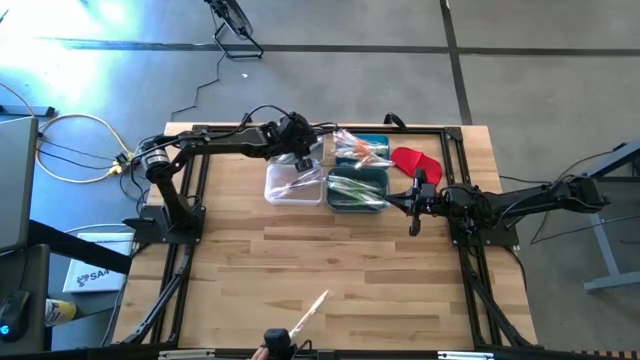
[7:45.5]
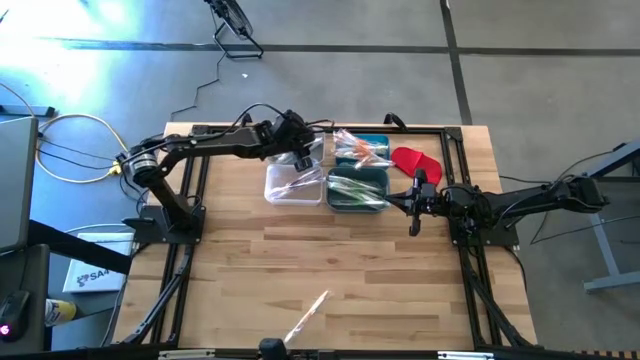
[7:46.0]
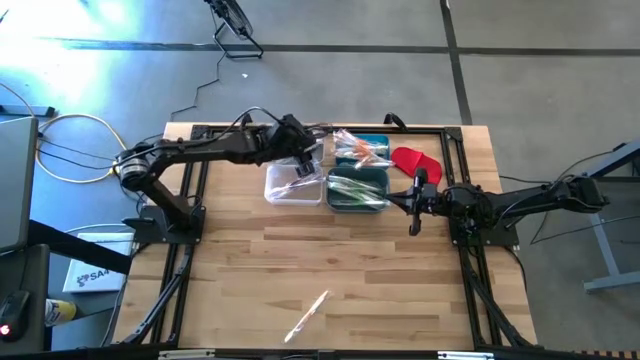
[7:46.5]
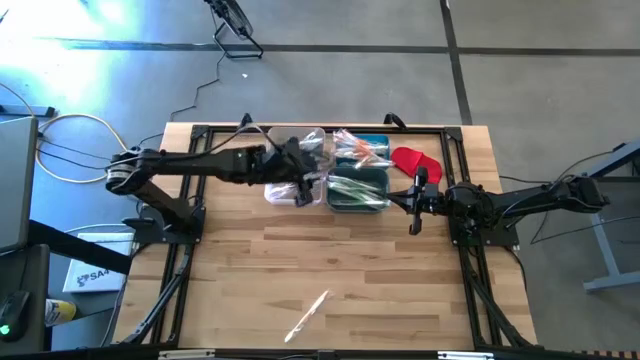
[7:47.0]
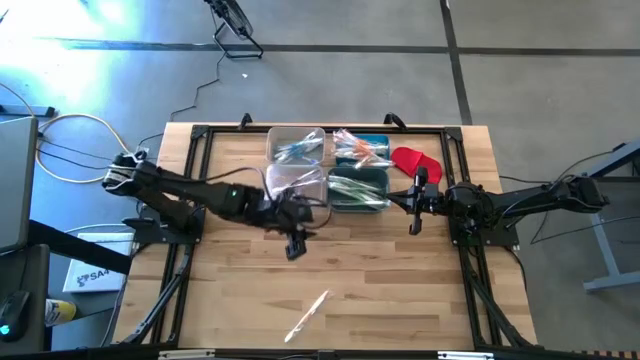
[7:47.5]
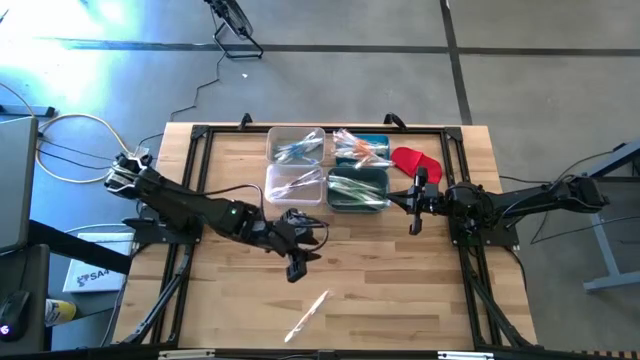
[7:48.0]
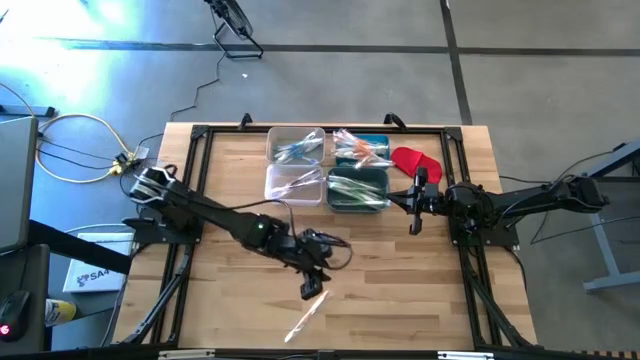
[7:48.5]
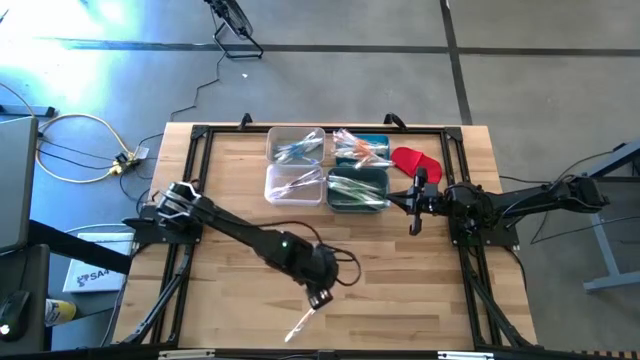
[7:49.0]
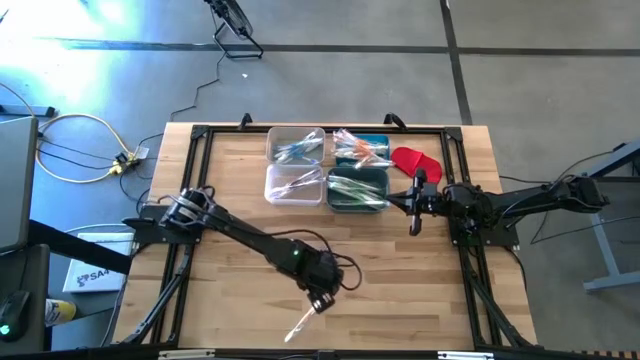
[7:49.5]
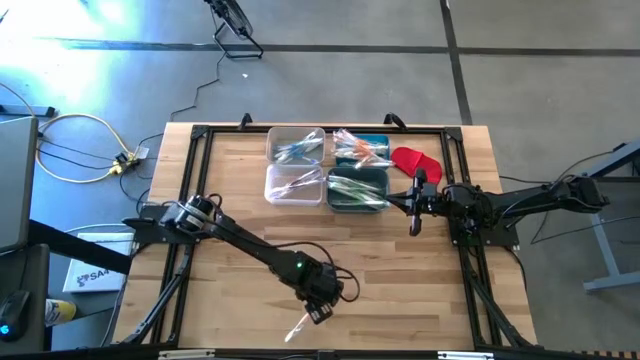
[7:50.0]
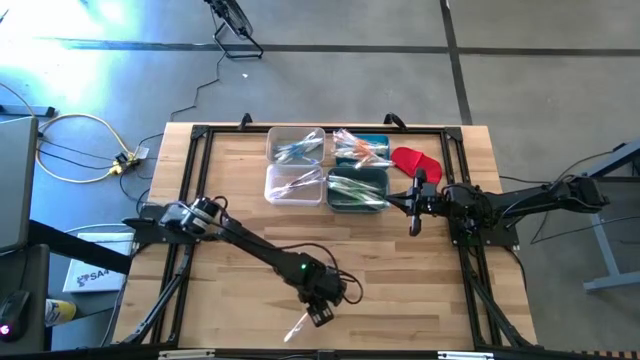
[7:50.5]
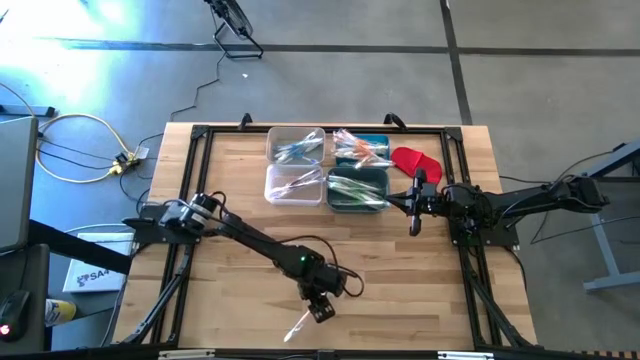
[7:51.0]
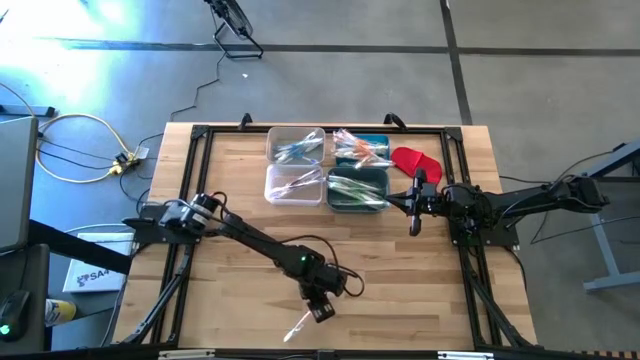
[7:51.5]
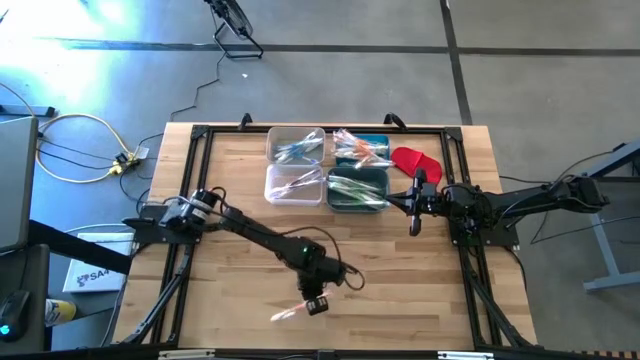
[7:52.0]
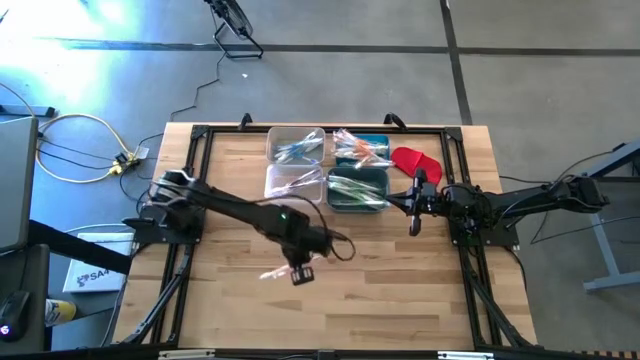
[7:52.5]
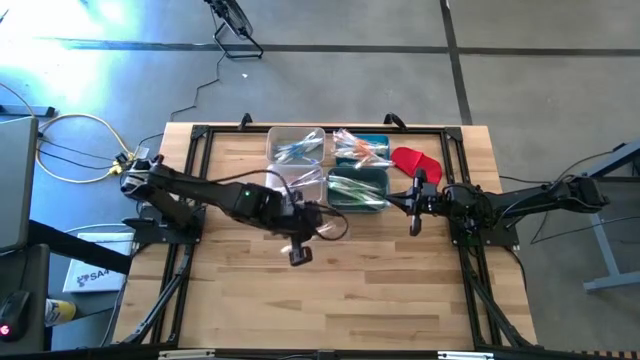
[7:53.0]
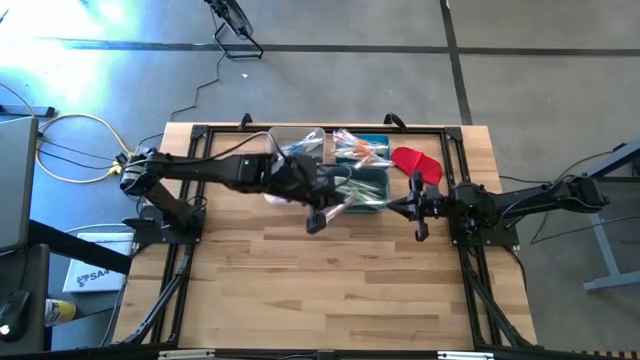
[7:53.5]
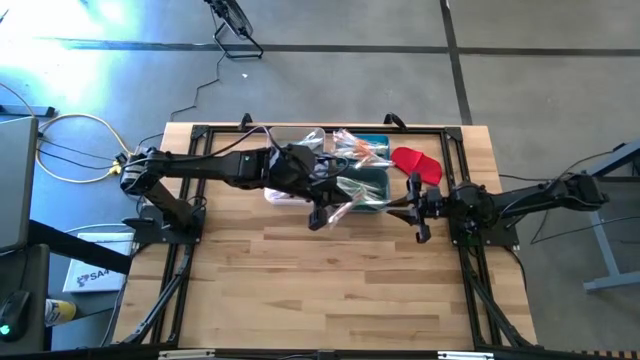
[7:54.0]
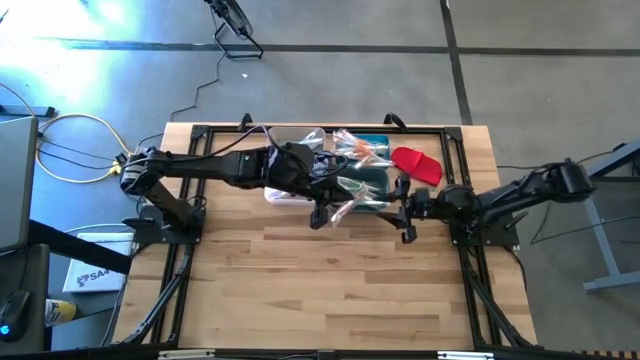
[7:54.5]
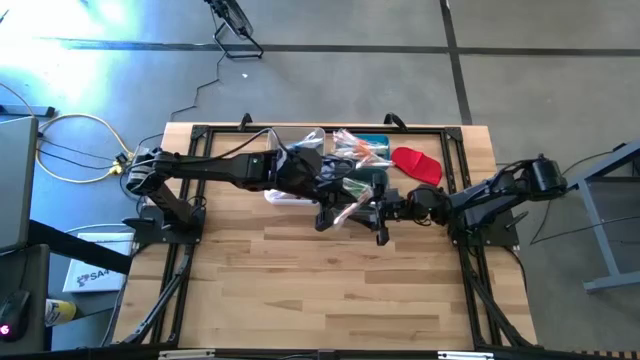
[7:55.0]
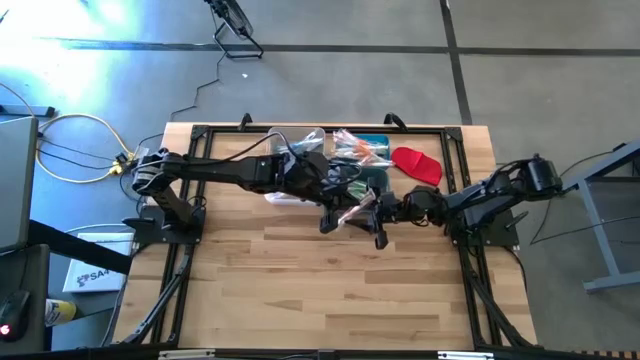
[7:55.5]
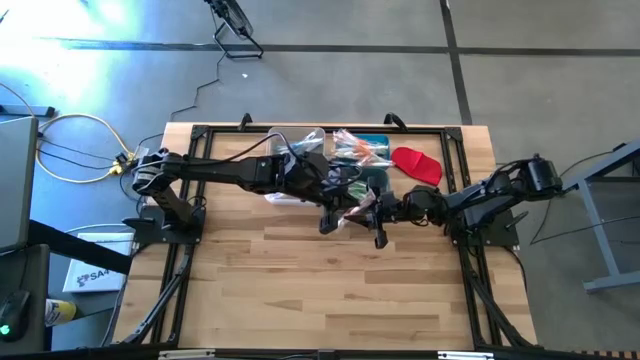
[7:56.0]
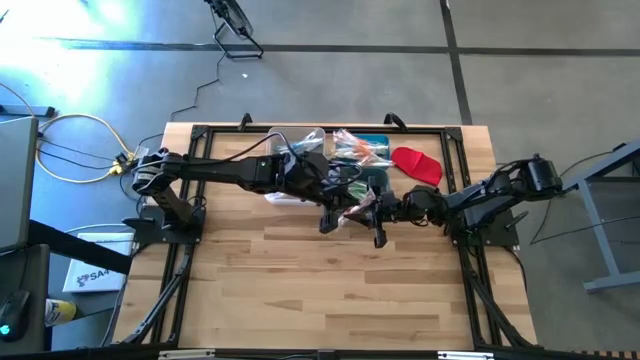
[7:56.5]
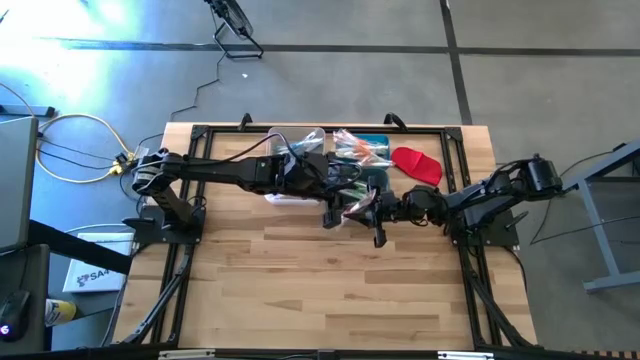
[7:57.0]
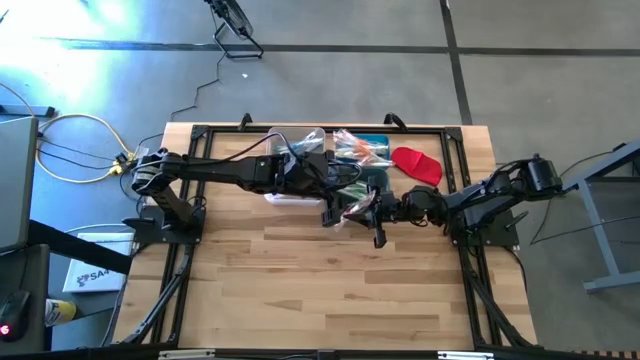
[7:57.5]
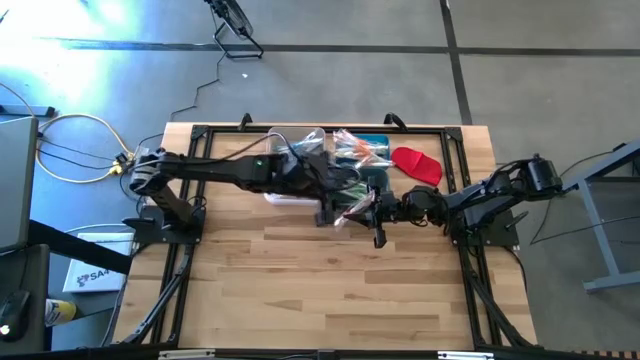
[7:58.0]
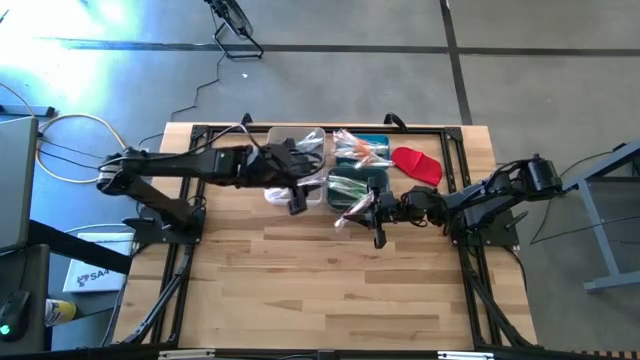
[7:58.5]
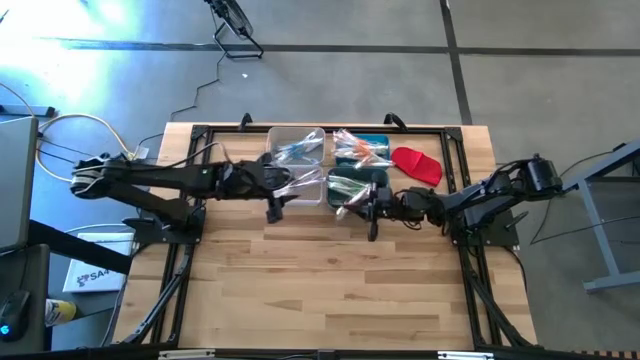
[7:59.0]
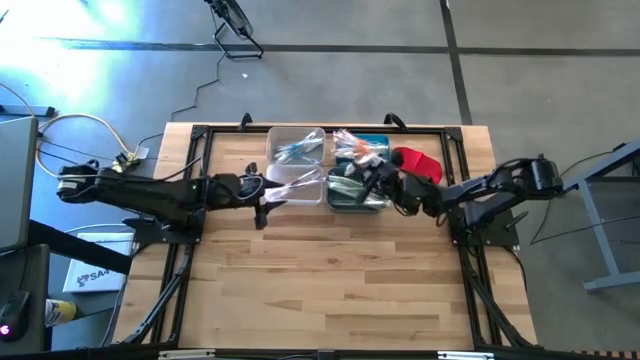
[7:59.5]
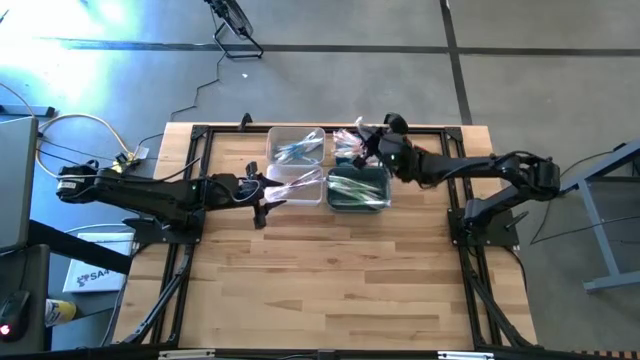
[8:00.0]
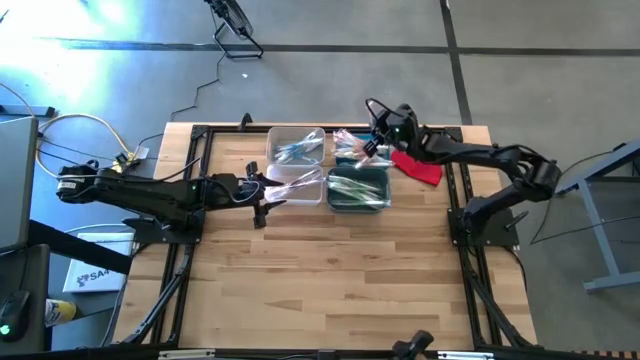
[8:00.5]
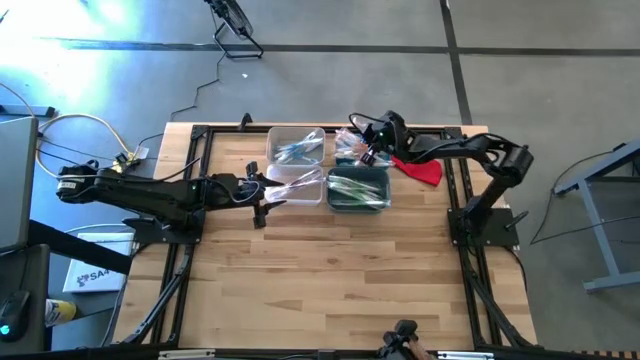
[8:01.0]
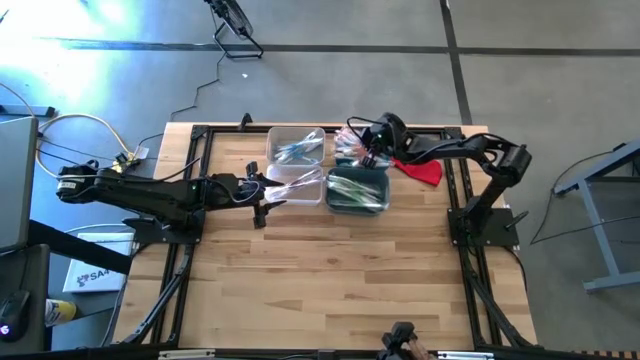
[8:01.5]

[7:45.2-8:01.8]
Task: Pick & Place Toothbrushes
Put the orange toothbrush into the blue bin

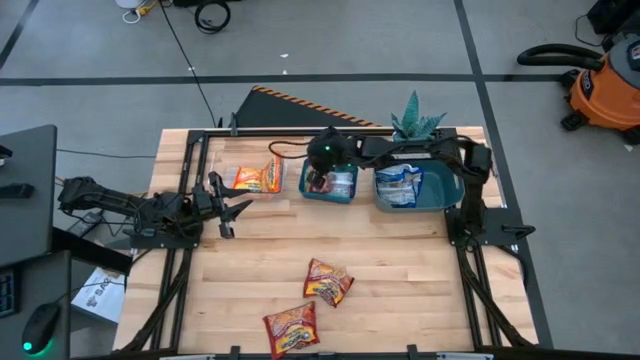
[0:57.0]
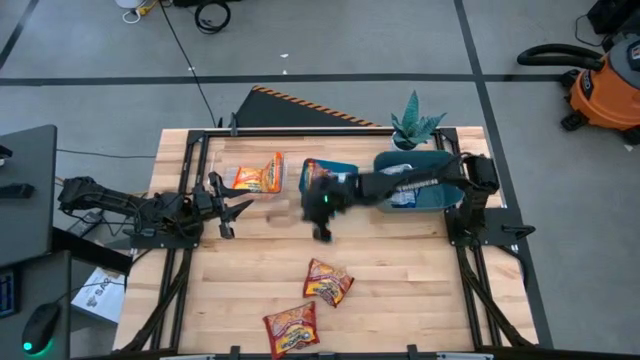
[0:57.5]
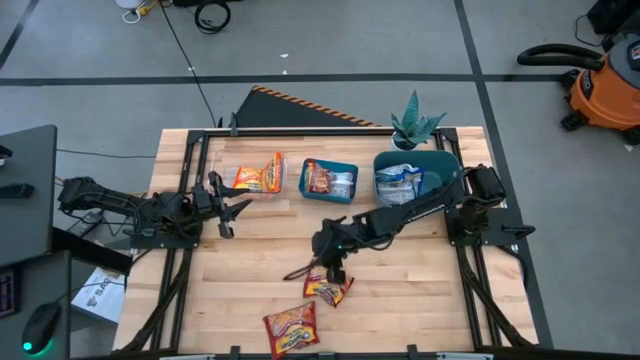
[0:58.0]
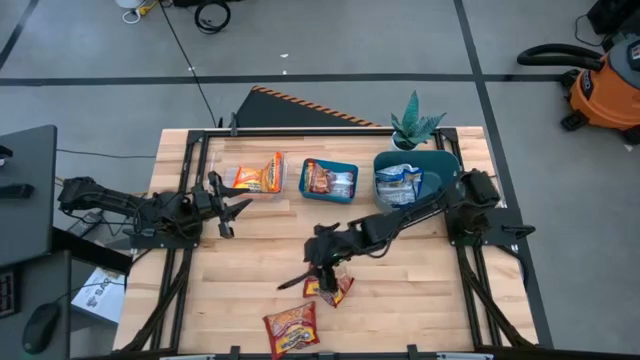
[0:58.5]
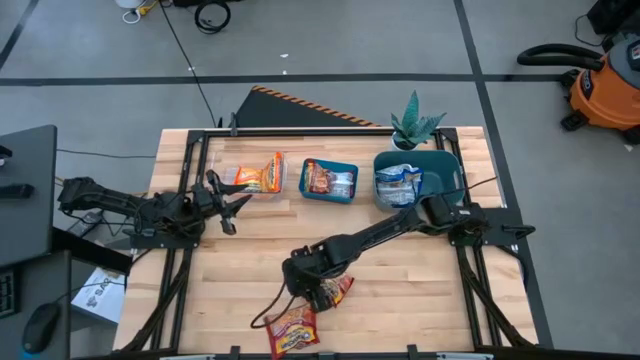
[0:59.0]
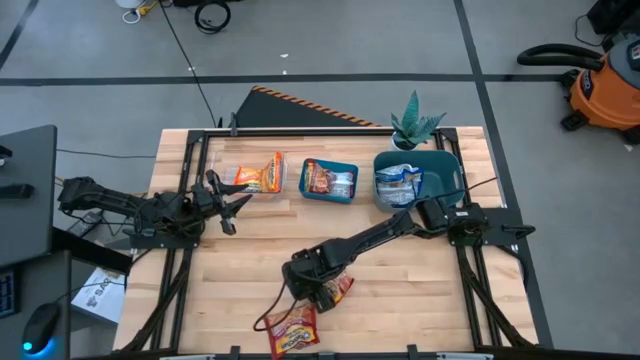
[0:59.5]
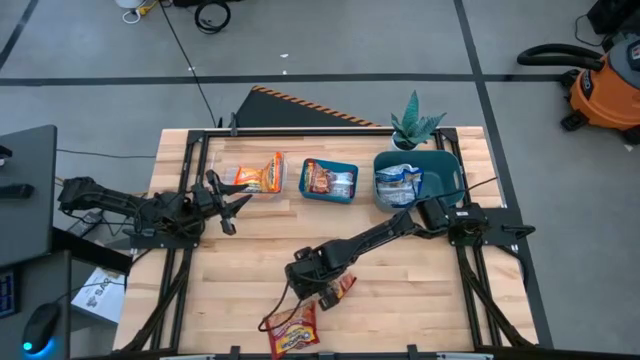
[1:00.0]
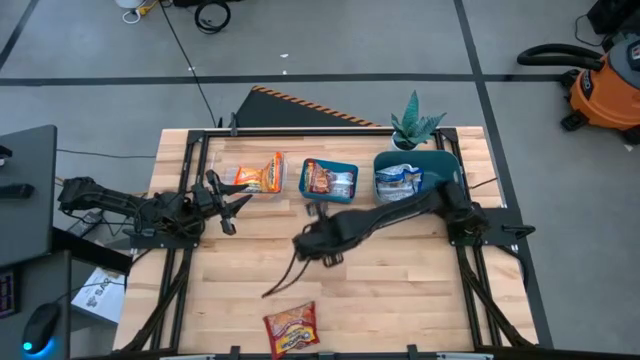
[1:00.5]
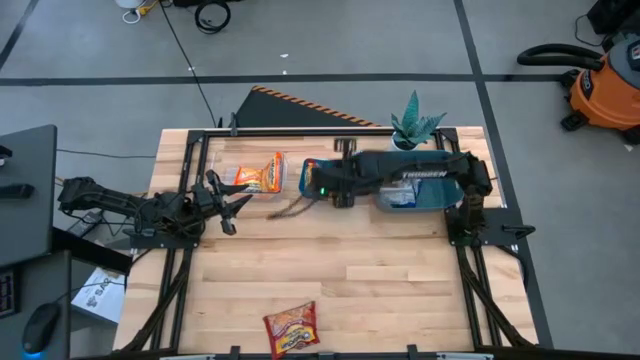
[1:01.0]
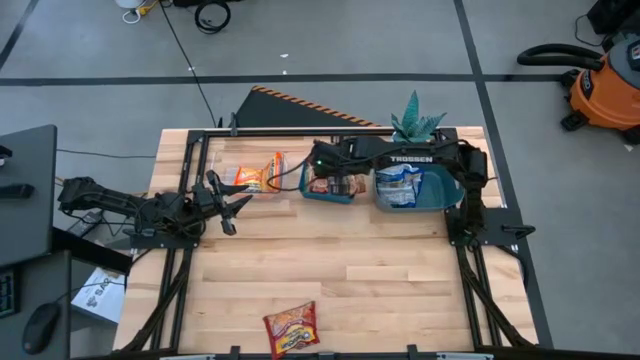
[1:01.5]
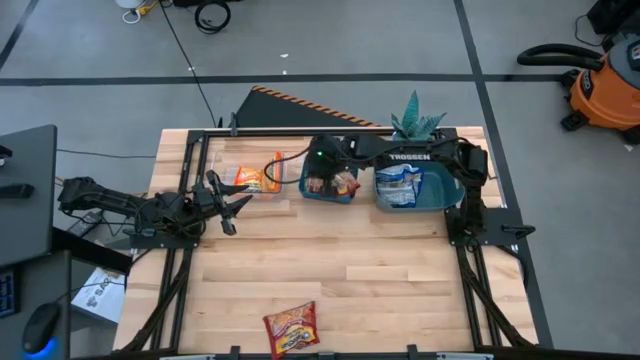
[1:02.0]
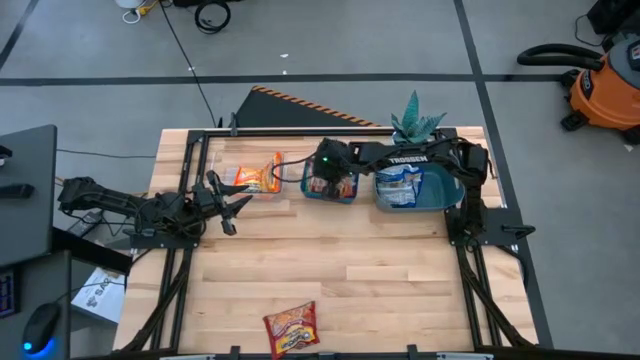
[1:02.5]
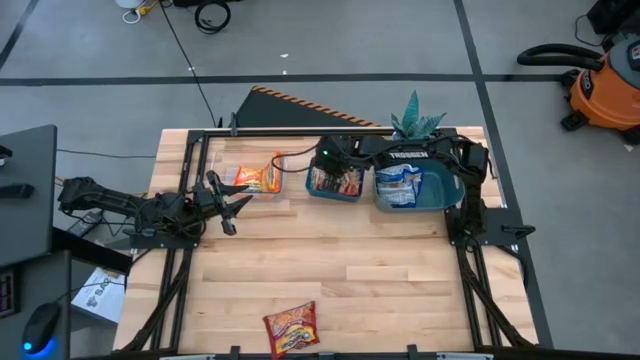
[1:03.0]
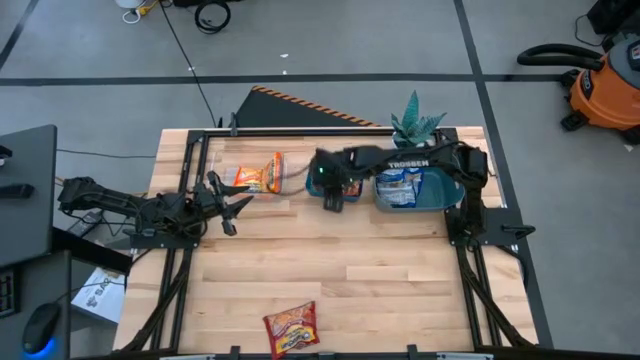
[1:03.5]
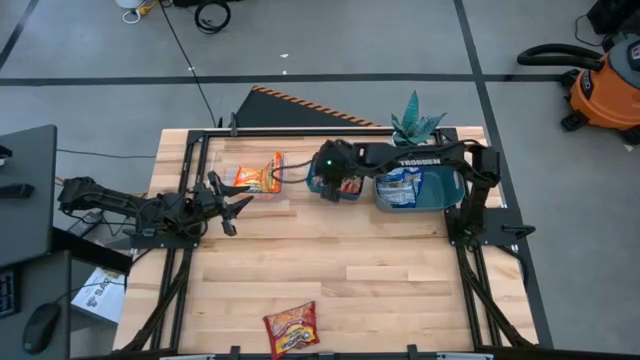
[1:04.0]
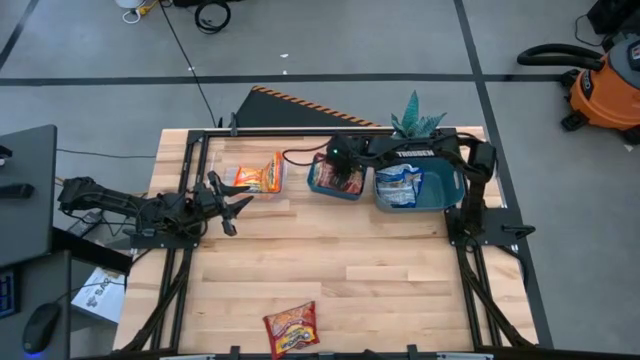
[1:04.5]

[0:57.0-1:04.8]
Task: Sort Maruchan noodles
Put the red noodle pack into the blue bin
